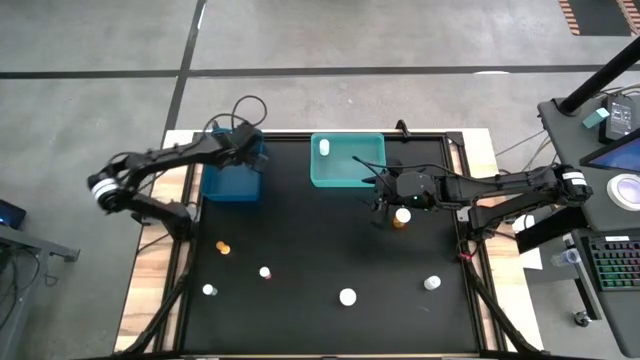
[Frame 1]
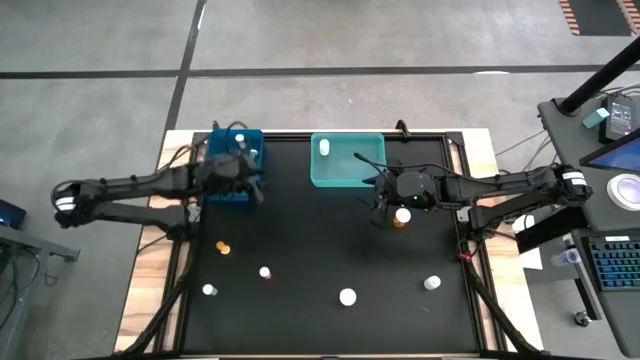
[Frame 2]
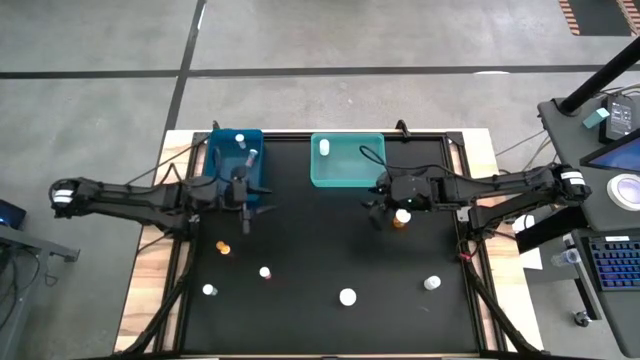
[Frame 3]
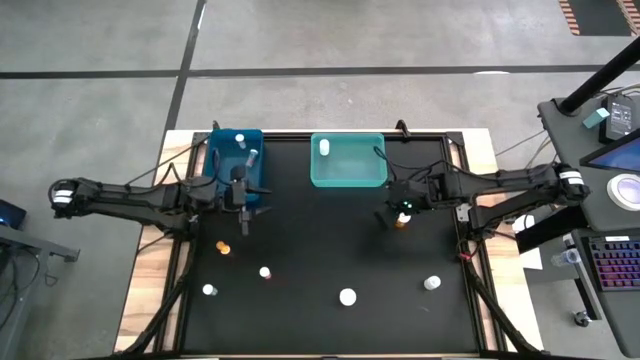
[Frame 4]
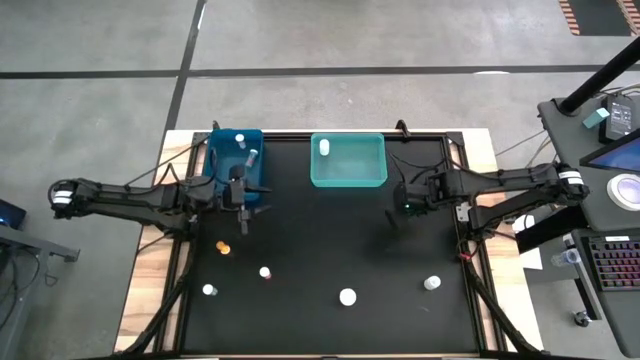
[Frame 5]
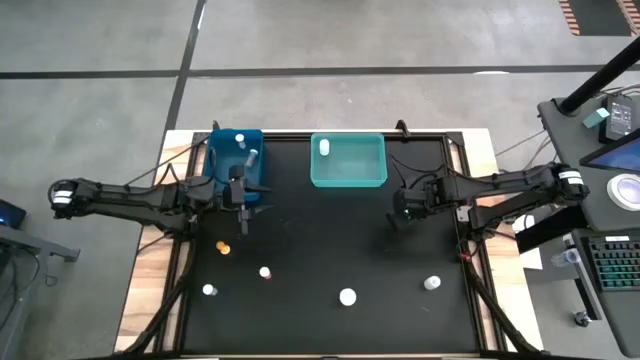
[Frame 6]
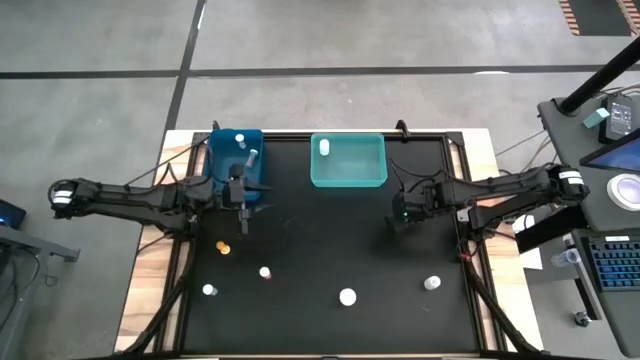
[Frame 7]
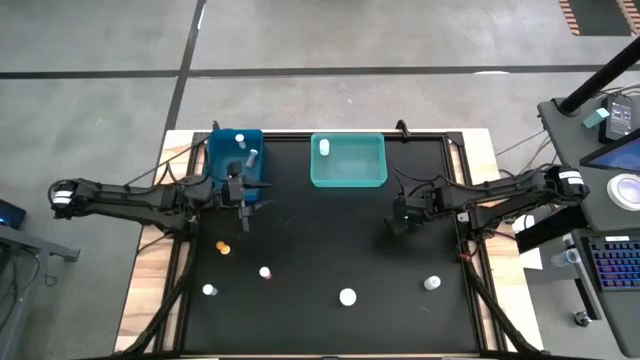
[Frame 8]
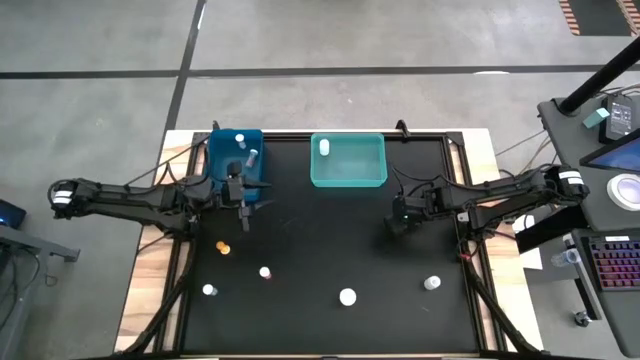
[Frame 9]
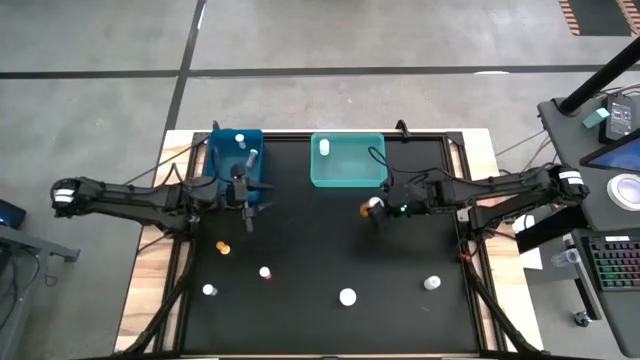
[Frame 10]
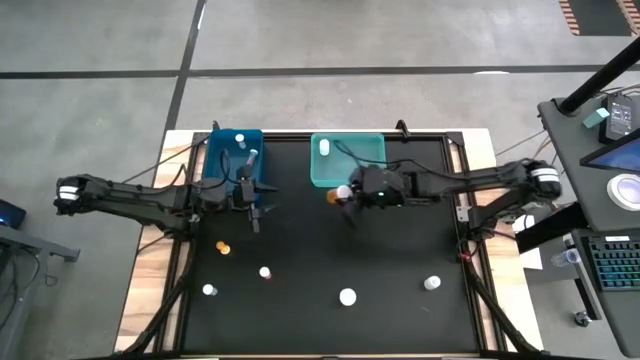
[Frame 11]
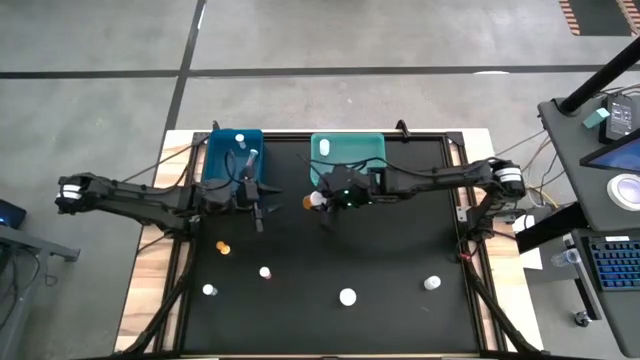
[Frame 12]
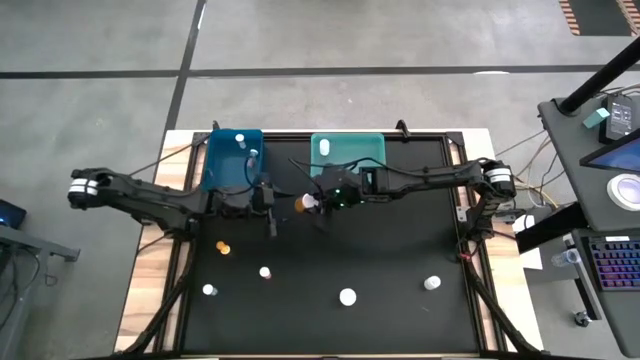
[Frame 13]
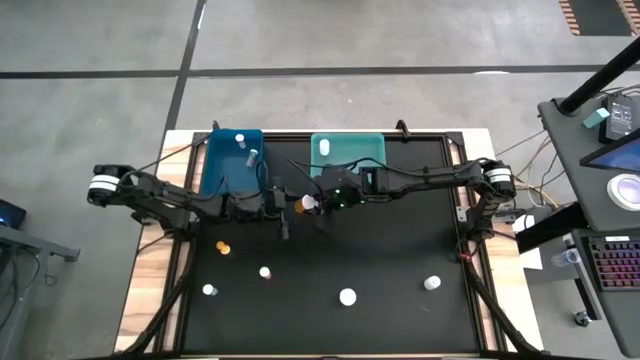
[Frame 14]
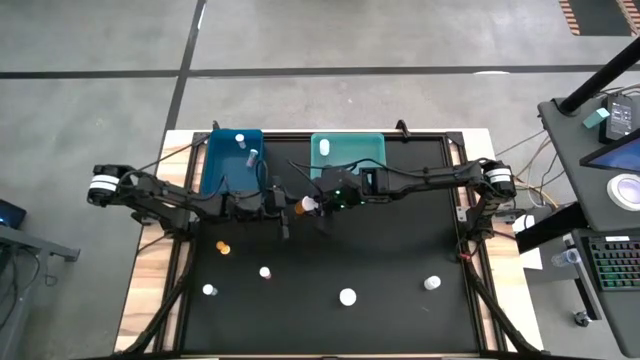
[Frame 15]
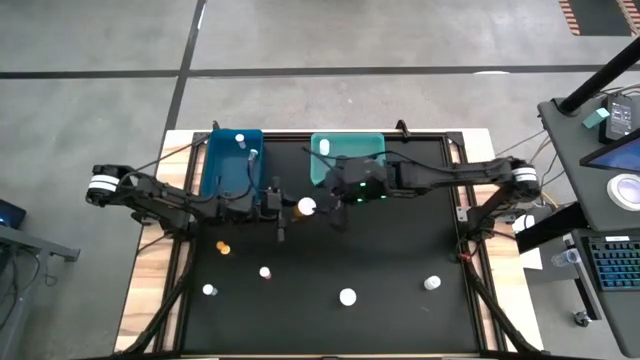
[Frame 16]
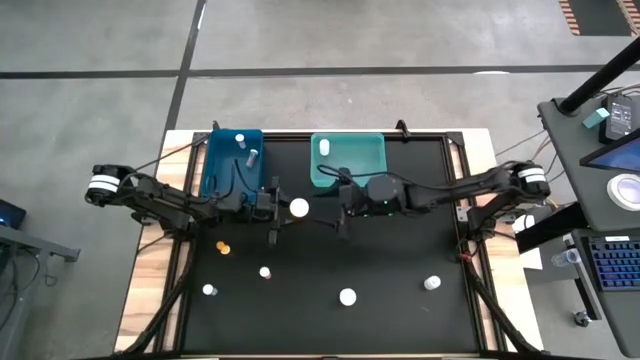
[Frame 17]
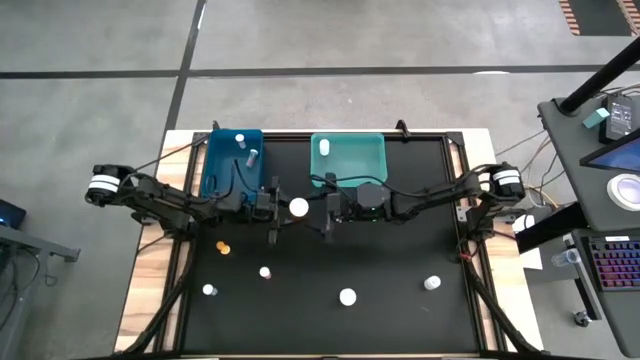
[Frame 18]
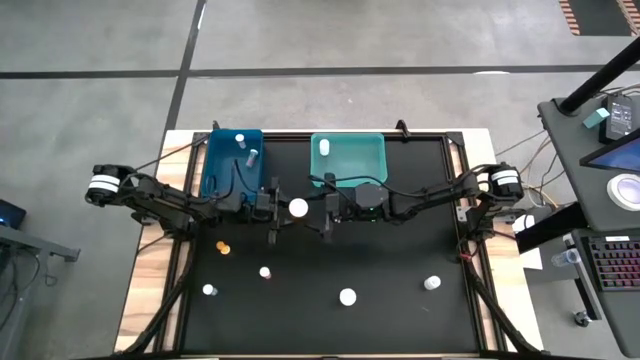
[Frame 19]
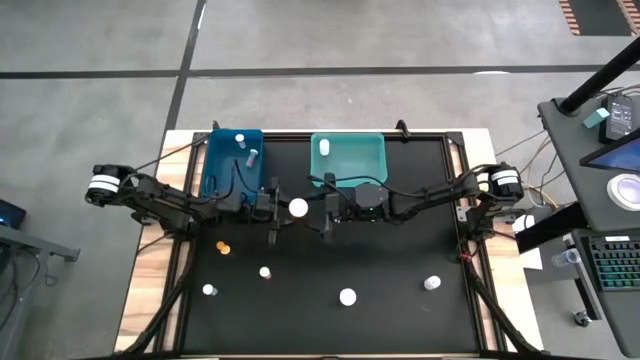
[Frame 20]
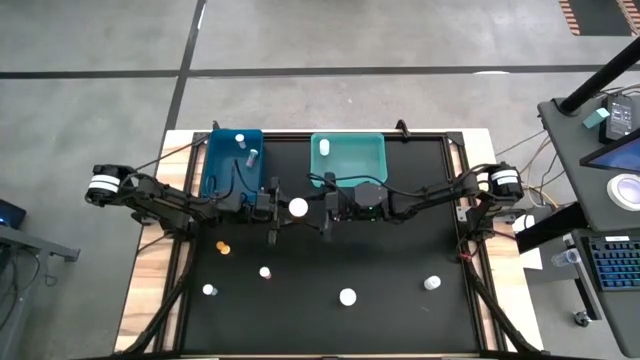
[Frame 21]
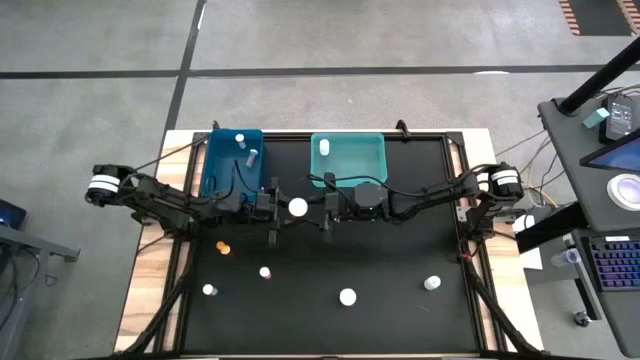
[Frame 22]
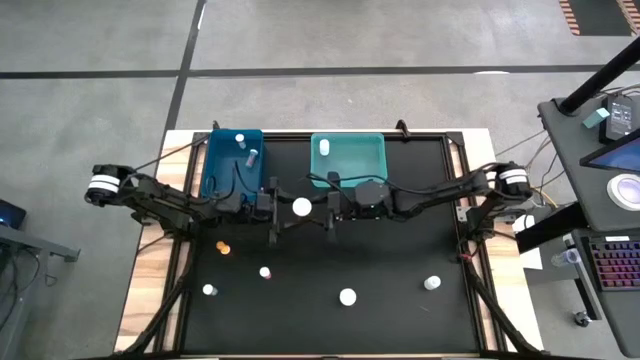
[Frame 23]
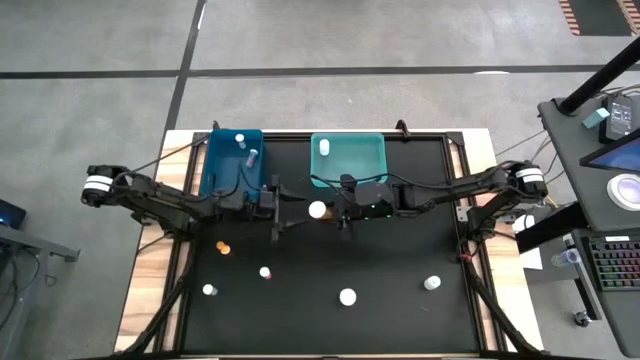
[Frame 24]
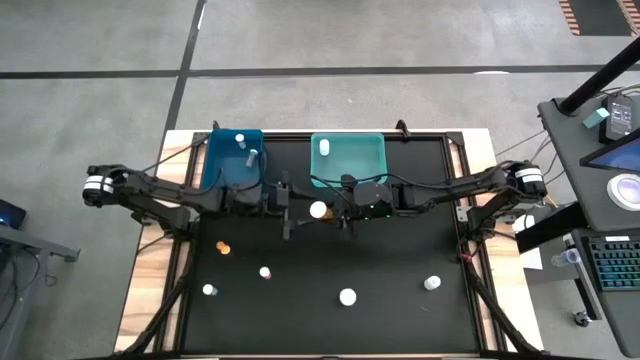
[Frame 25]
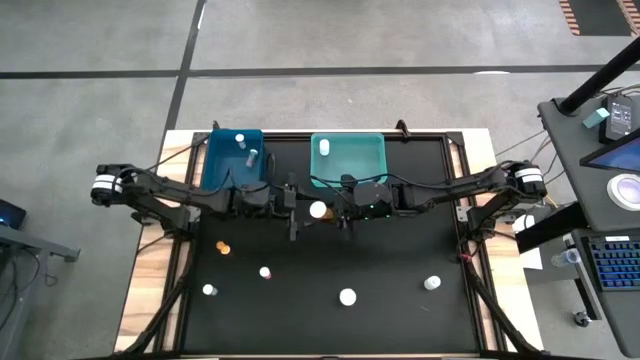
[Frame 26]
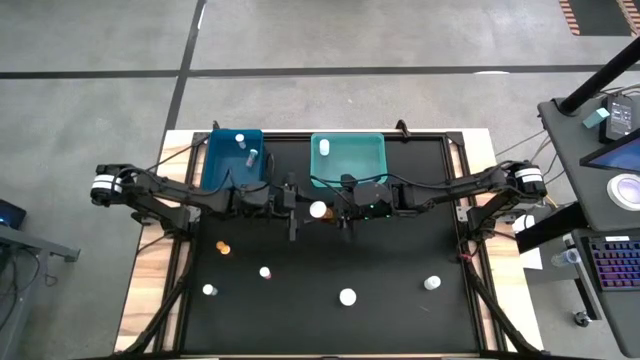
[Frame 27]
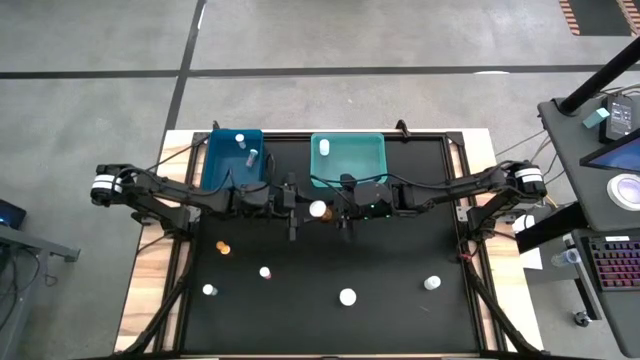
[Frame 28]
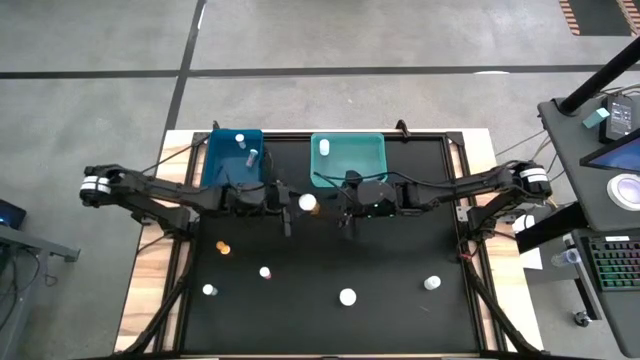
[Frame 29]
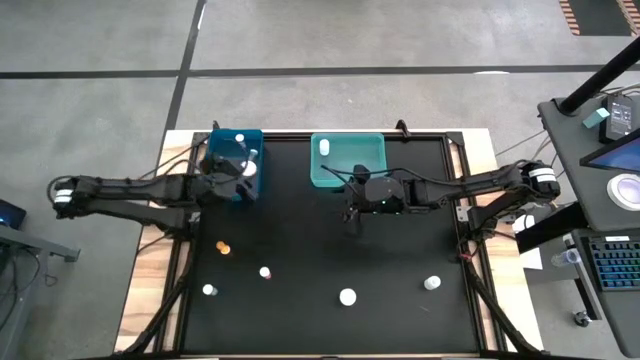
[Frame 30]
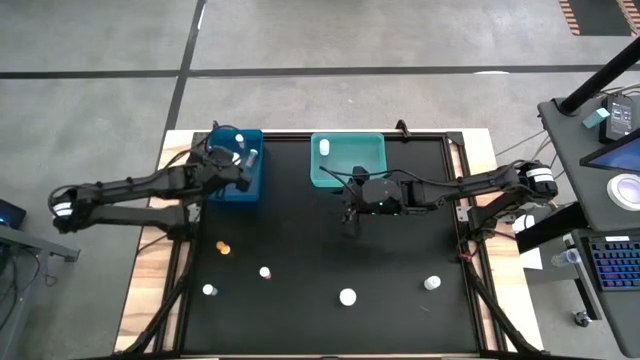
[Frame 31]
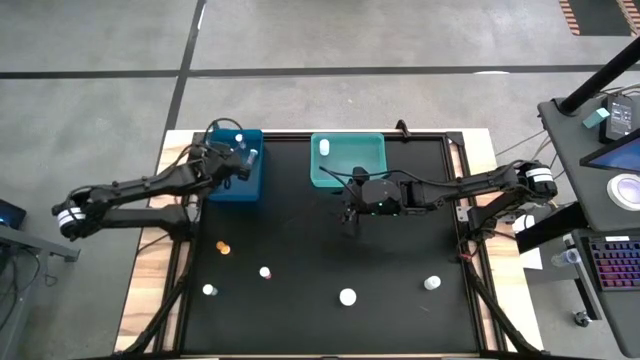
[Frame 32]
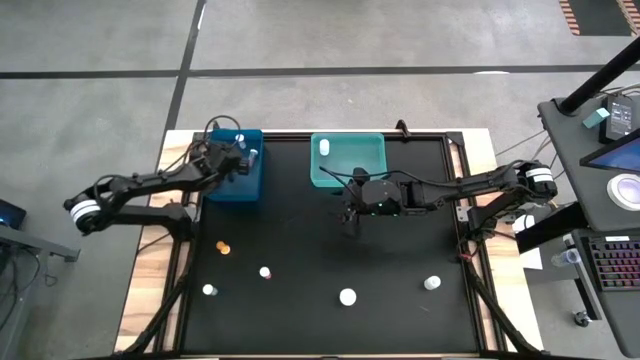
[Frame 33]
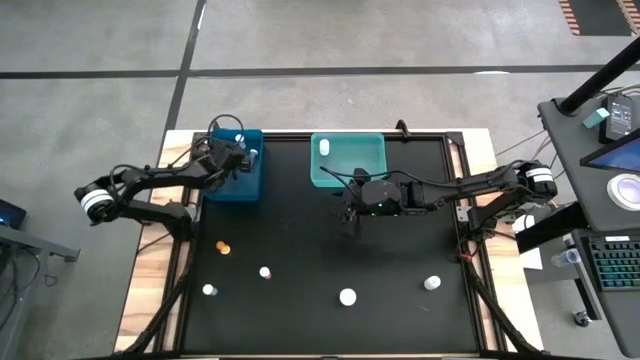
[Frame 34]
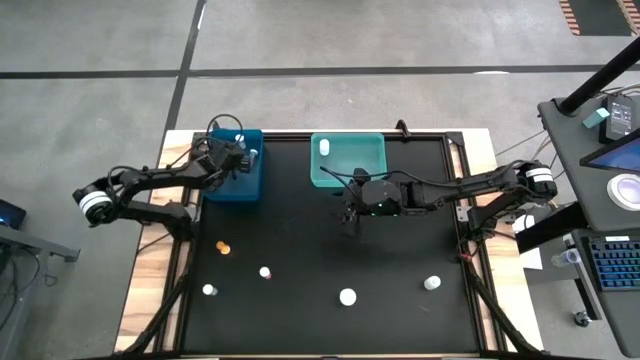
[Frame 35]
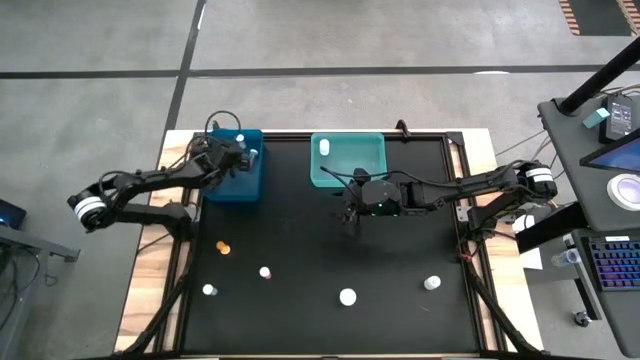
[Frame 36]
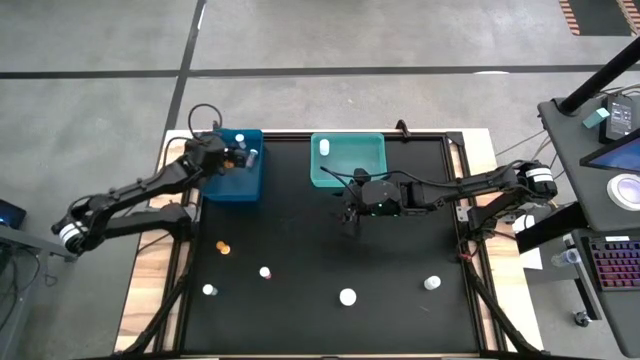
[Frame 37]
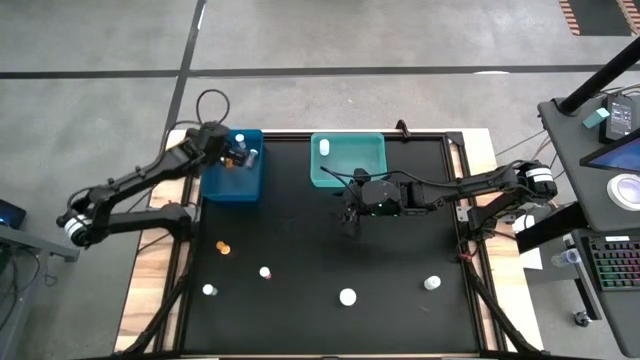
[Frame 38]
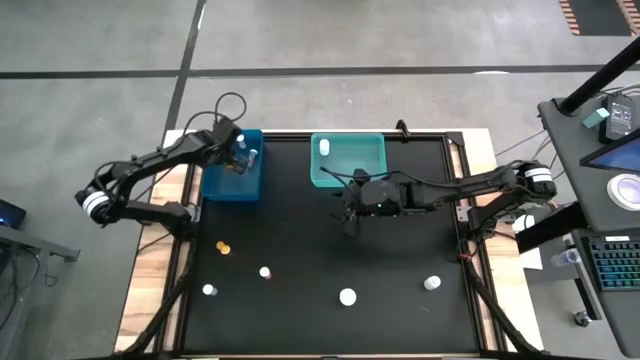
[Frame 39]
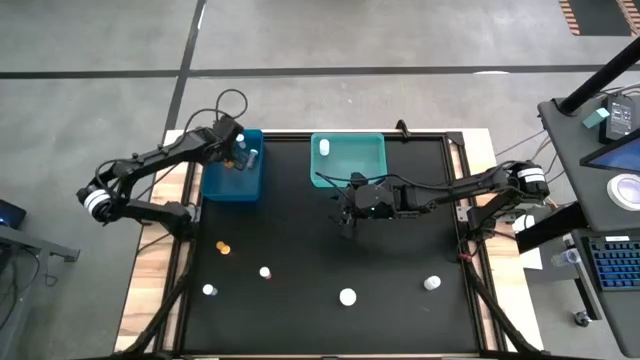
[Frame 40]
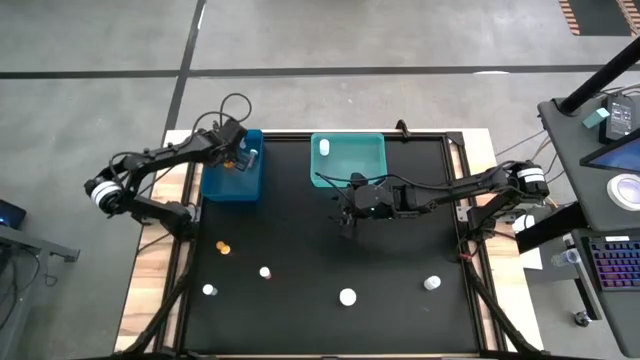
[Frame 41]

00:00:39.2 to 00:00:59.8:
Task: Pick and place medicine bottles into bin by pill shape (circle, oval)
Put the top orange capsule bottle into the blue bin
